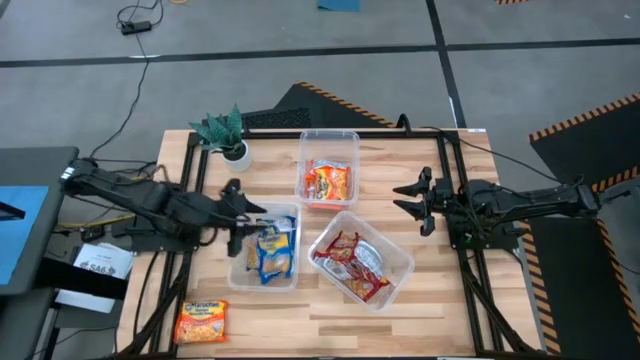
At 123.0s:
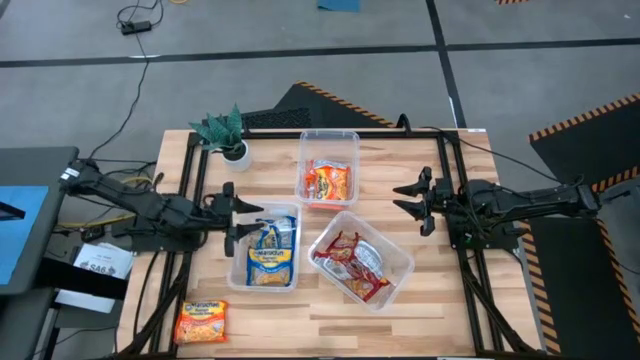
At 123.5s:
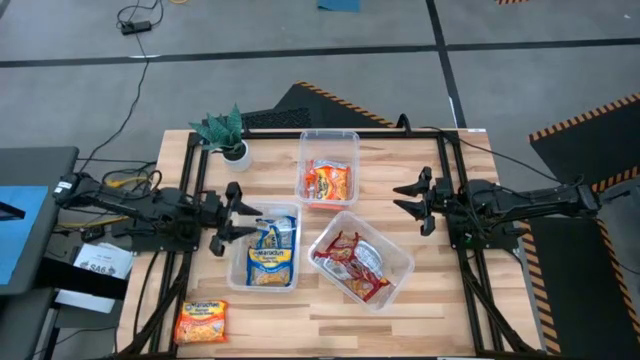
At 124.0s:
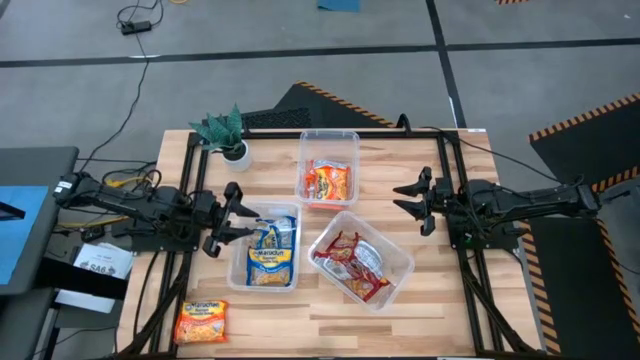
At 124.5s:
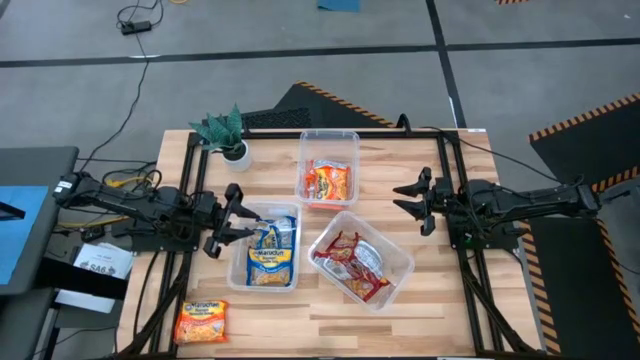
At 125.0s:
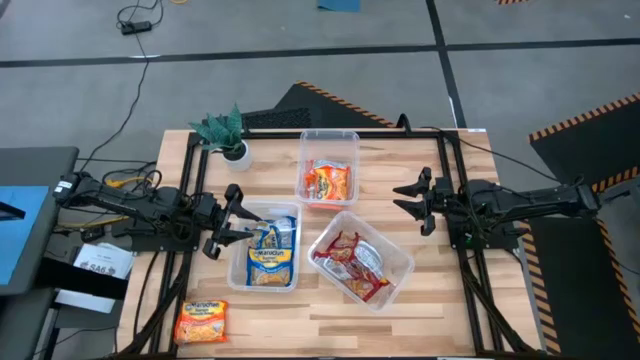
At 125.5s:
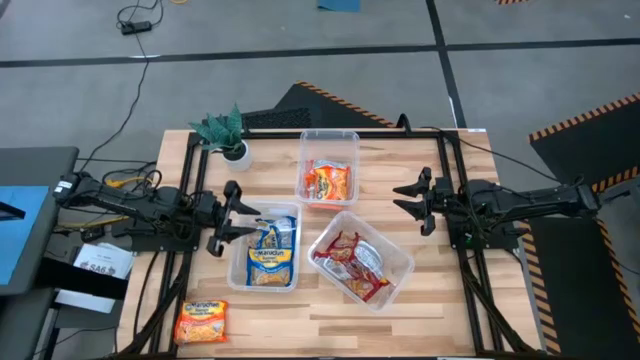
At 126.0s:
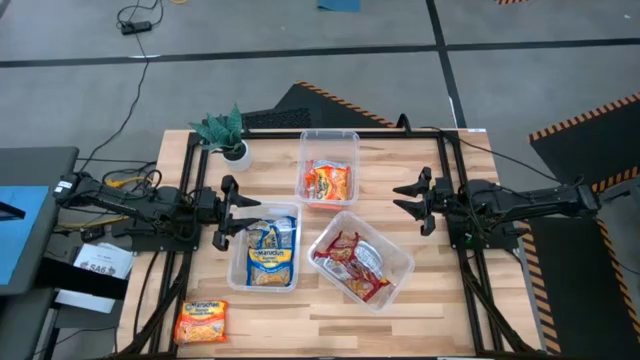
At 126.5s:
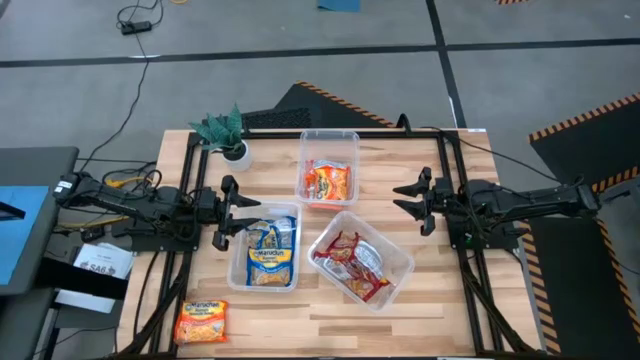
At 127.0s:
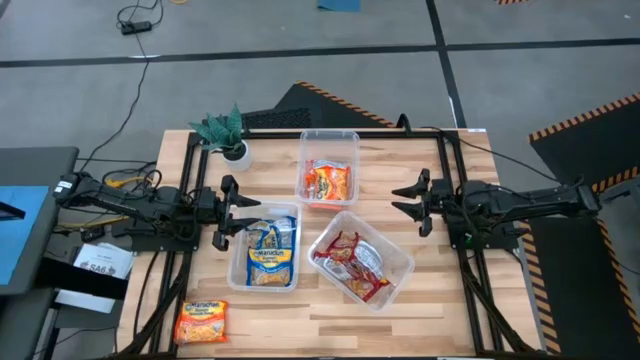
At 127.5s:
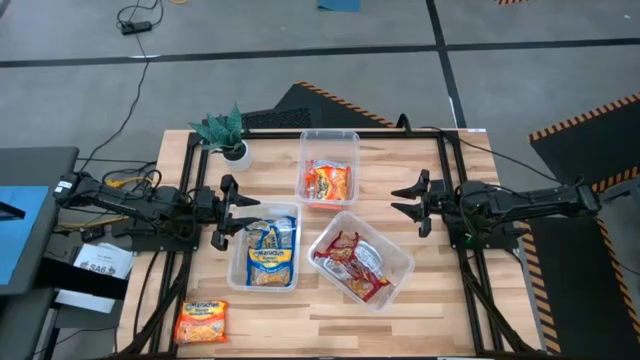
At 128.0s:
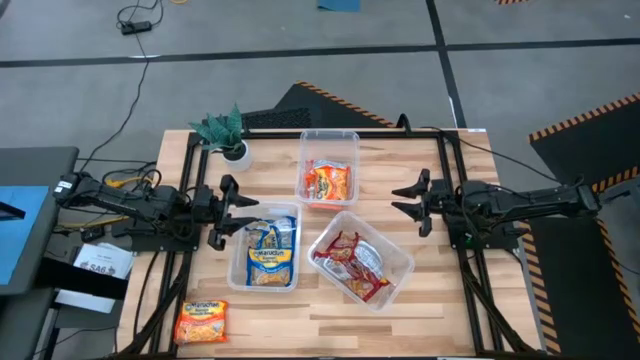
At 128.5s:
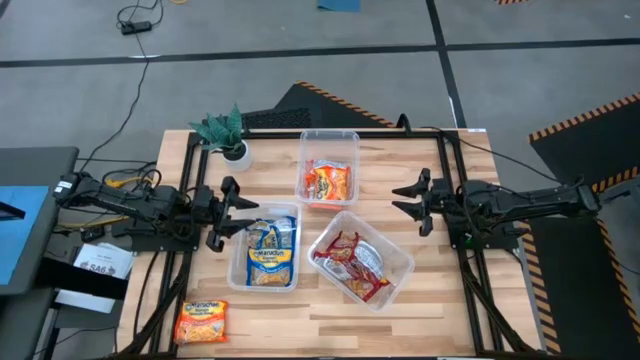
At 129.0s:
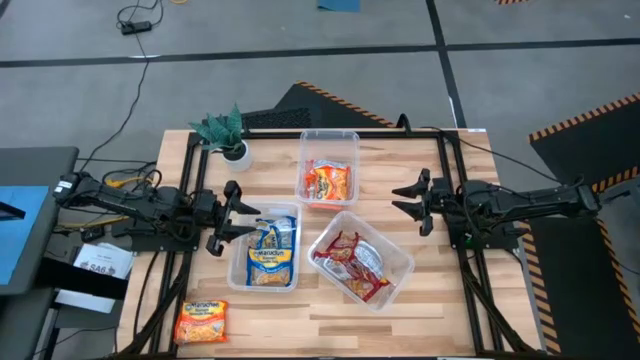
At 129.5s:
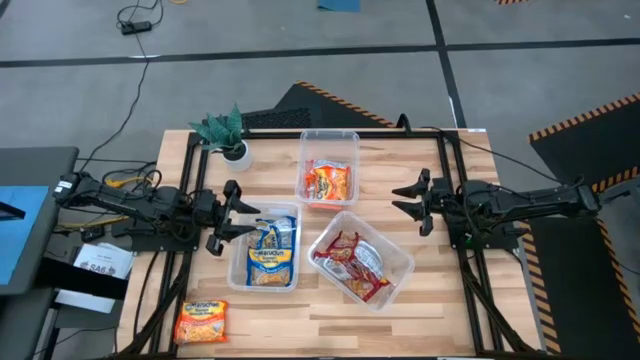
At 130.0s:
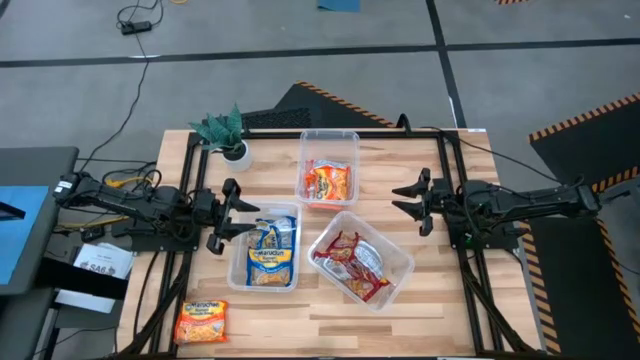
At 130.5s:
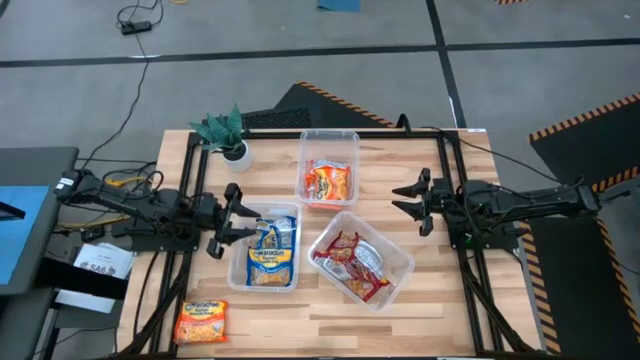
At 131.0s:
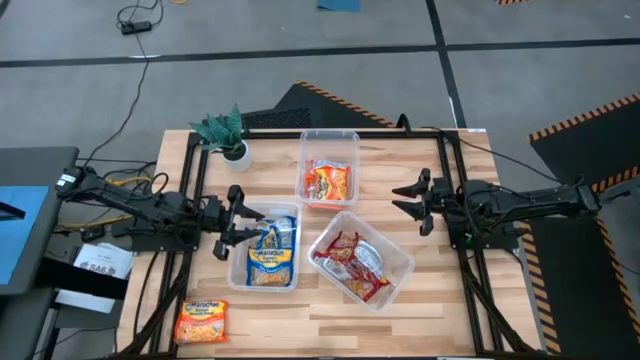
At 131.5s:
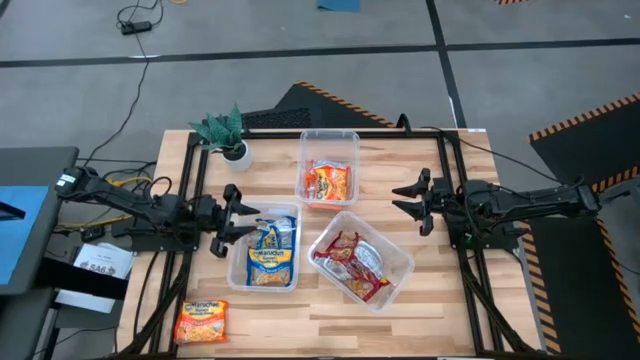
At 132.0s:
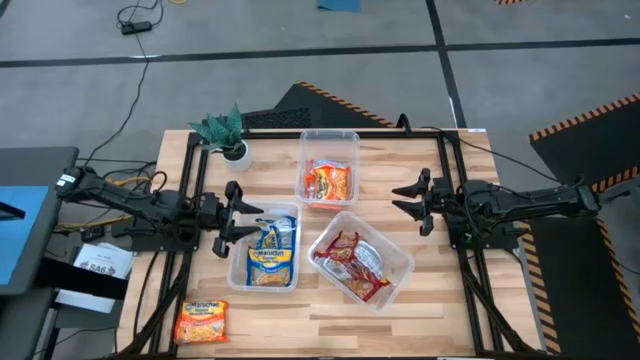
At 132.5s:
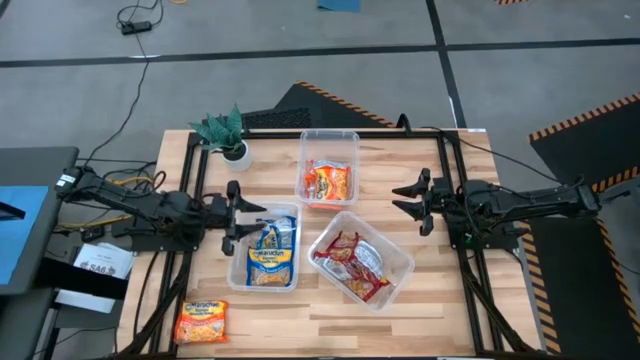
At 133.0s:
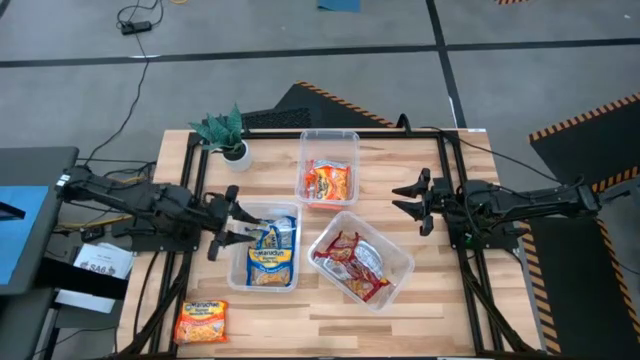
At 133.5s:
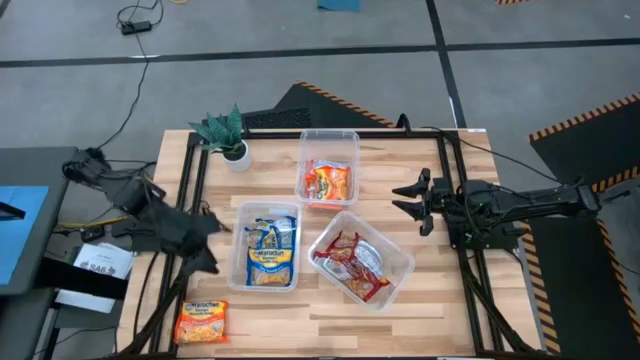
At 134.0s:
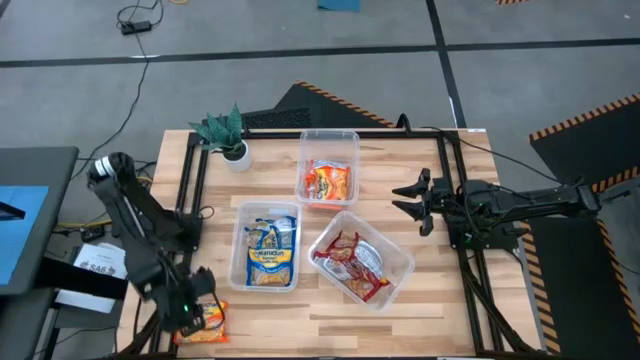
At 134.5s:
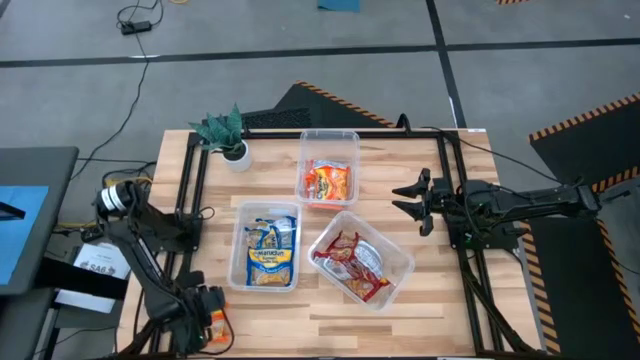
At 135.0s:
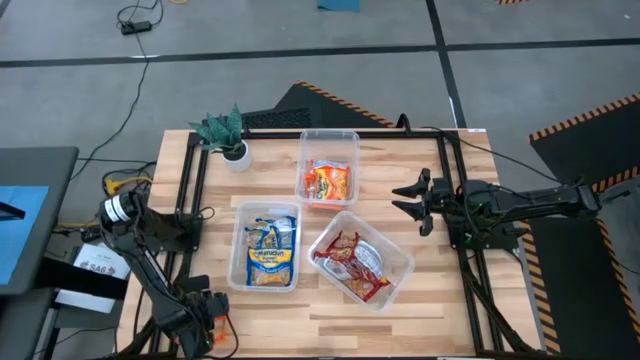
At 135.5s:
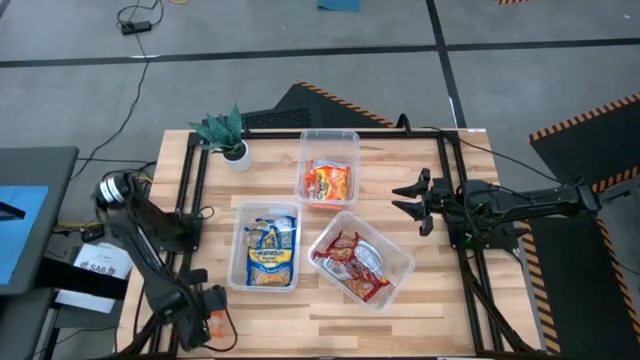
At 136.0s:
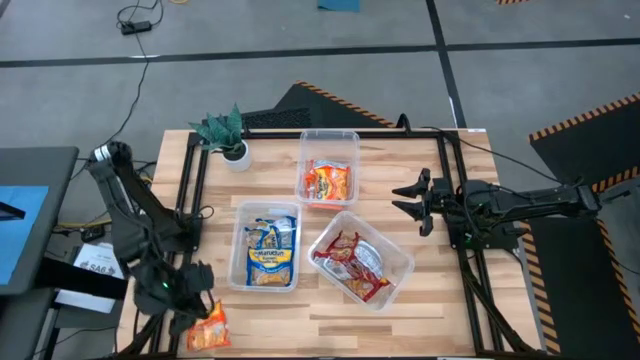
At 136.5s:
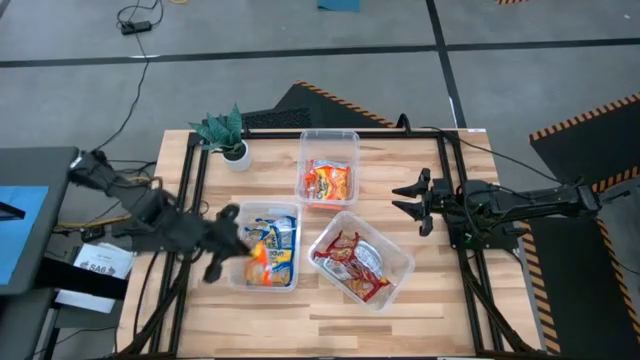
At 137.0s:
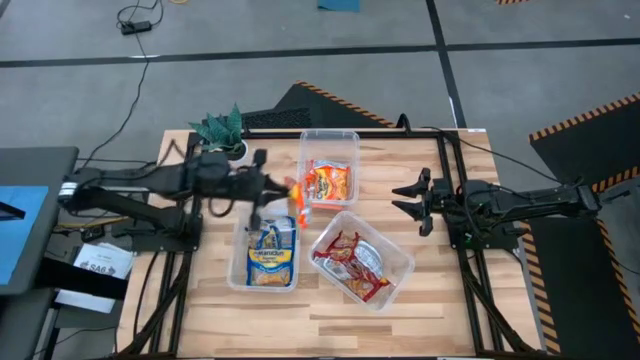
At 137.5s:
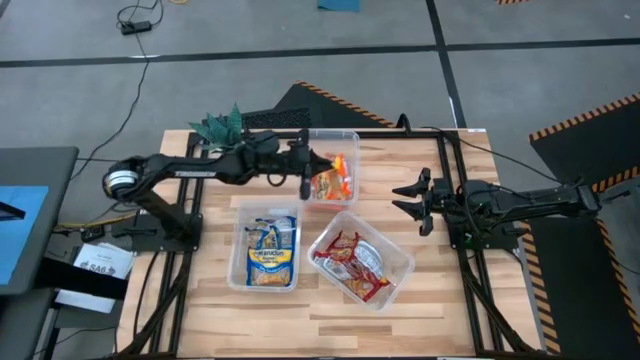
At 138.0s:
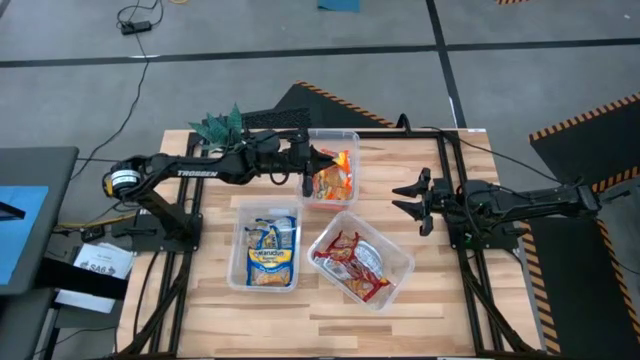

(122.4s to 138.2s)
Task: Sort Maruchan noodles
Put the orange noodle pack into the top transparent bin

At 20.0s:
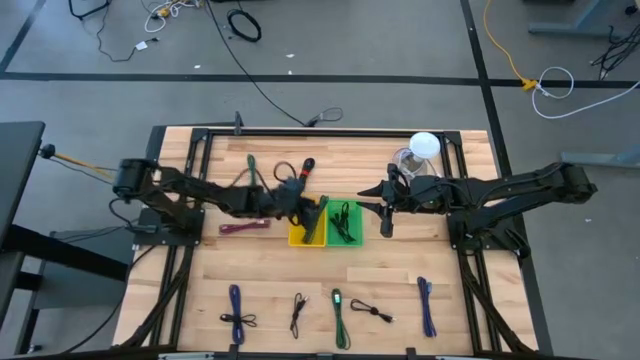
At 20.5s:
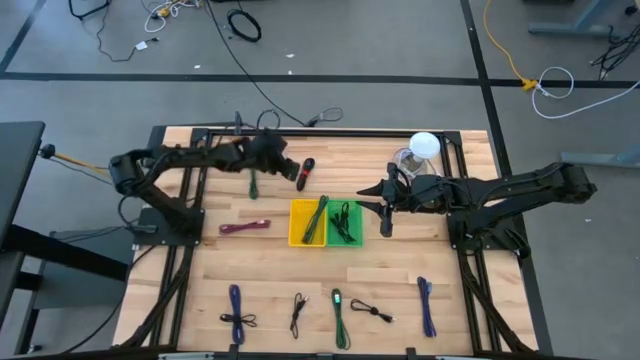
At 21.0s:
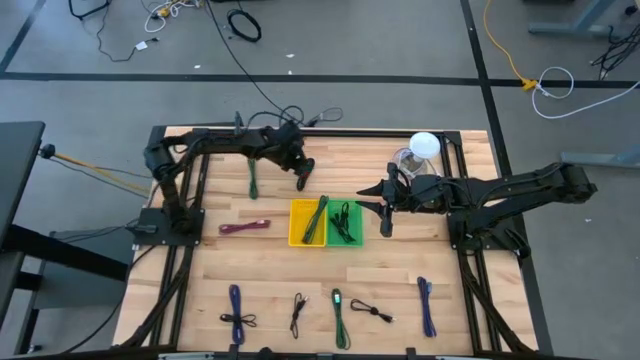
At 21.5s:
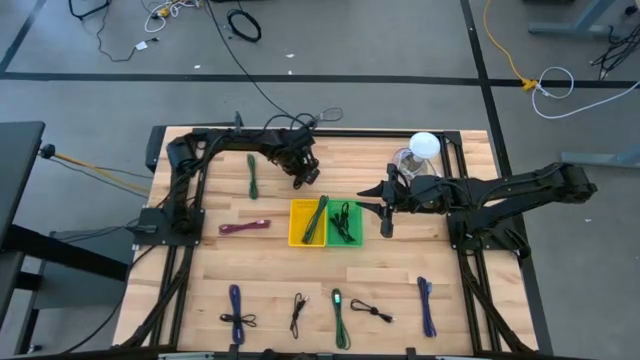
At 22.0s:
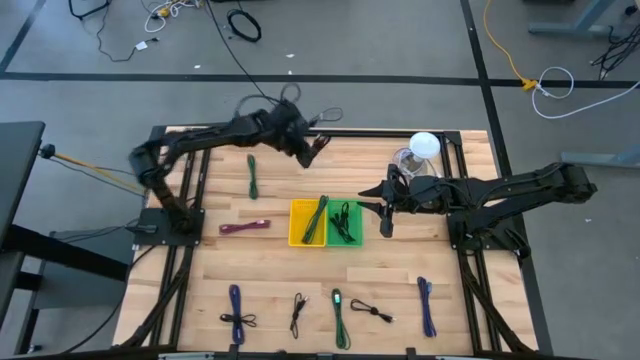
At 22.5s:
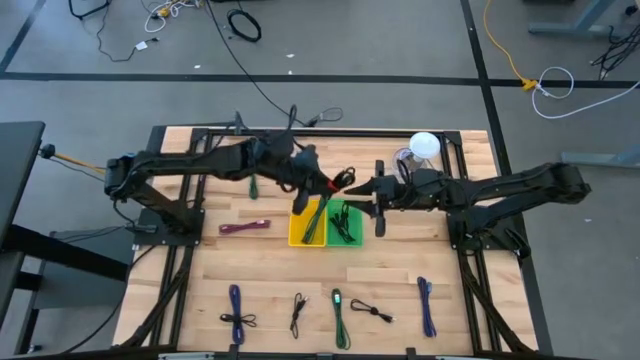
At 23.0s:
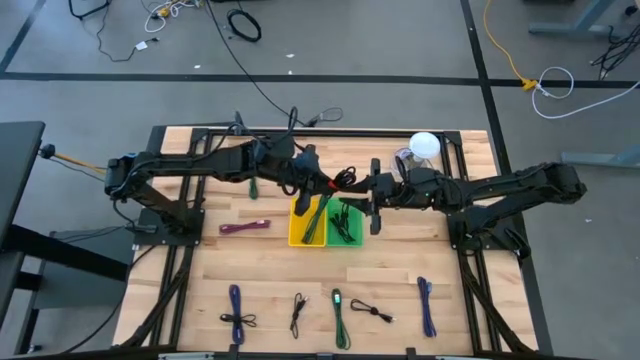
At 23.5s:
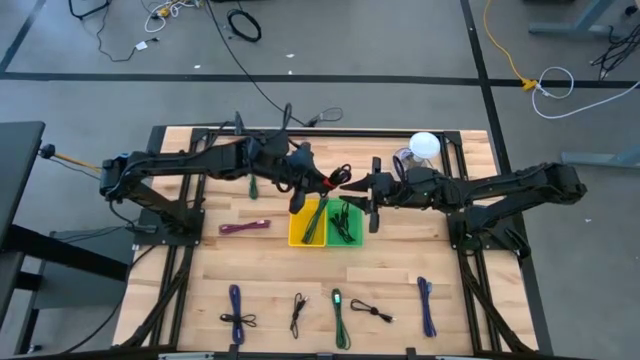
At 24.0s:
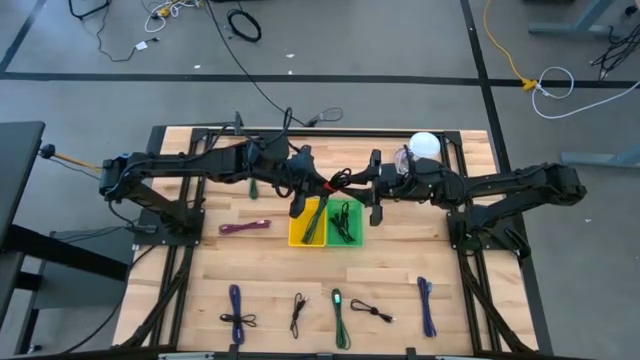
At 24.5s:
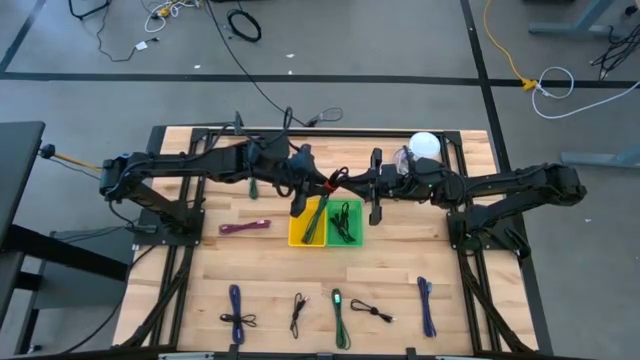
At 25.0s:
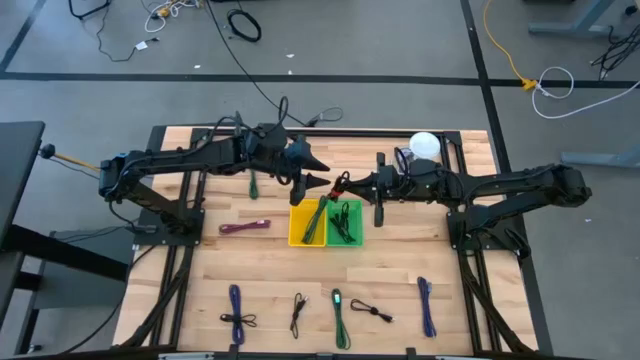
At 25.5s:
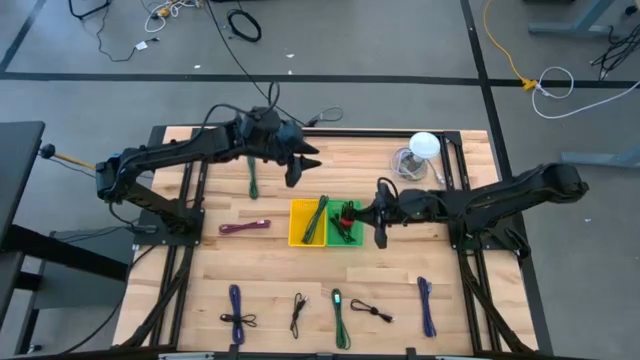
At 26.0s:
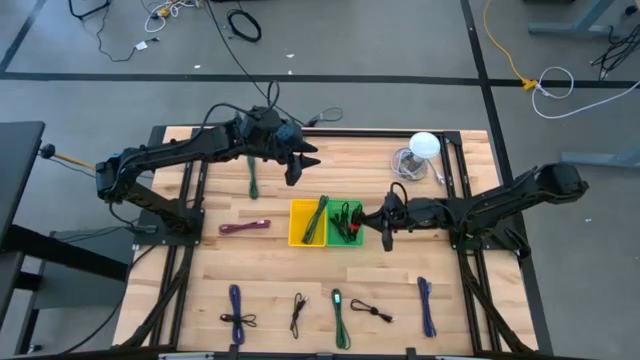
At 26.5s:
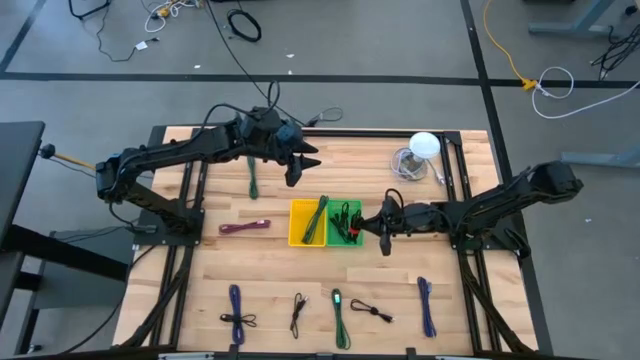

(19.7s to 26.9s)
Task: Pick & Place USB Port
Put the black charger cable into the green basket
